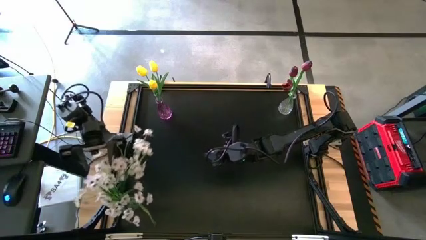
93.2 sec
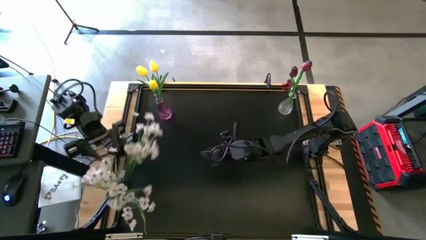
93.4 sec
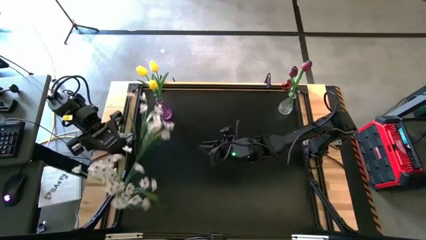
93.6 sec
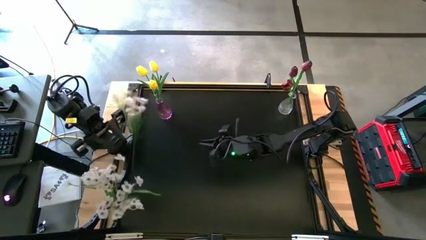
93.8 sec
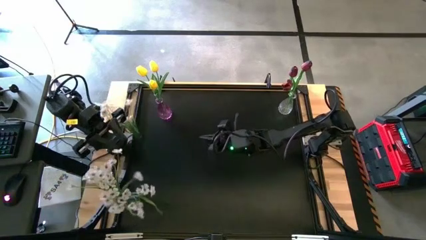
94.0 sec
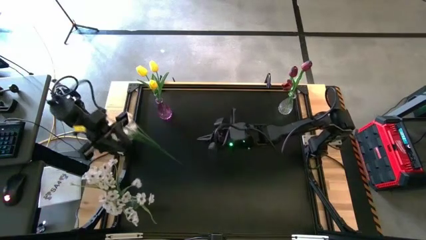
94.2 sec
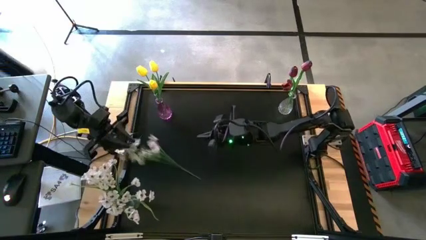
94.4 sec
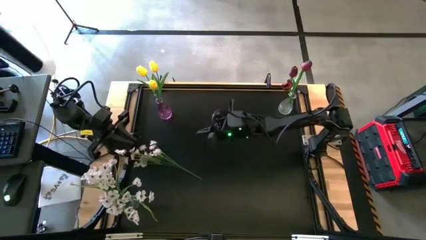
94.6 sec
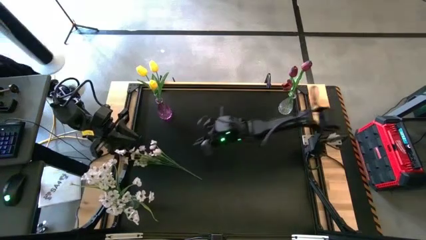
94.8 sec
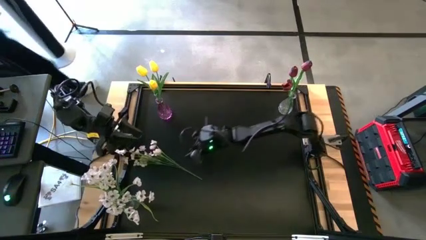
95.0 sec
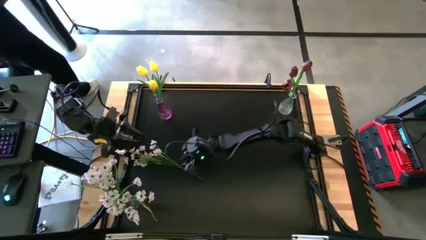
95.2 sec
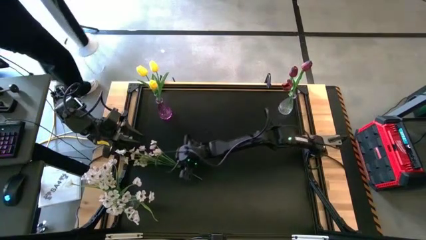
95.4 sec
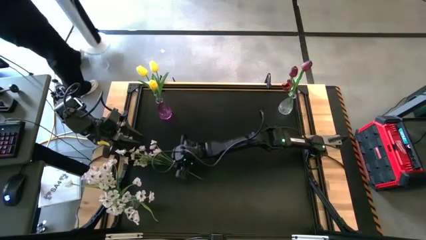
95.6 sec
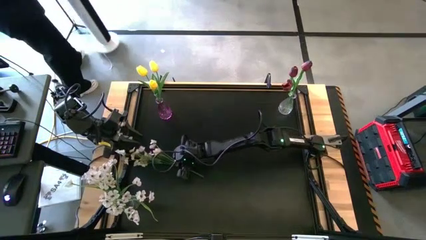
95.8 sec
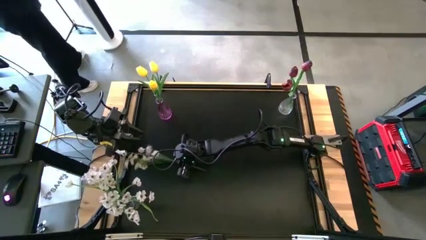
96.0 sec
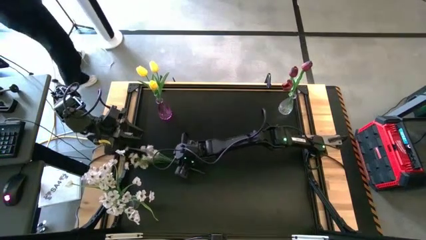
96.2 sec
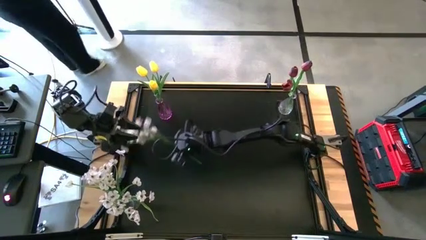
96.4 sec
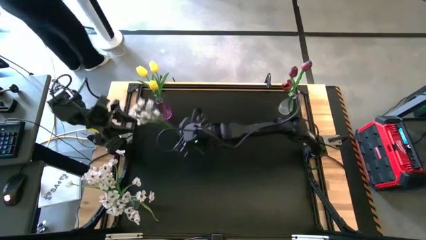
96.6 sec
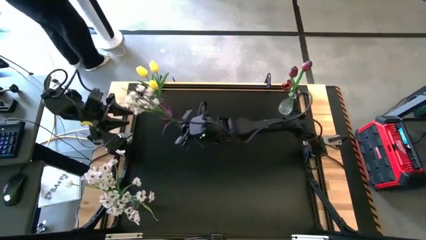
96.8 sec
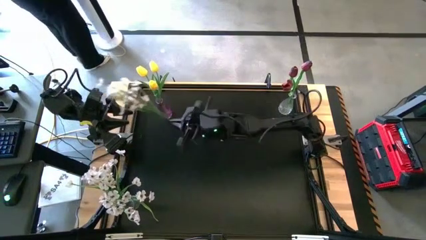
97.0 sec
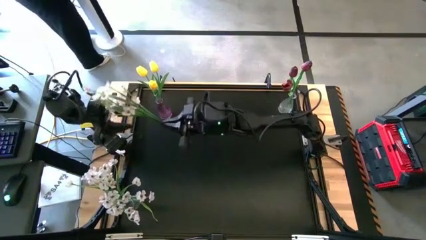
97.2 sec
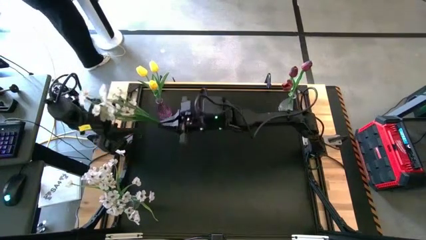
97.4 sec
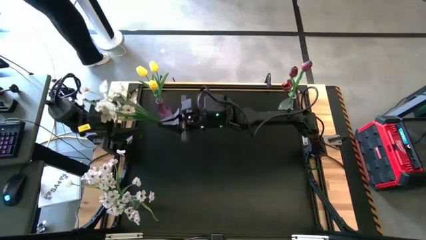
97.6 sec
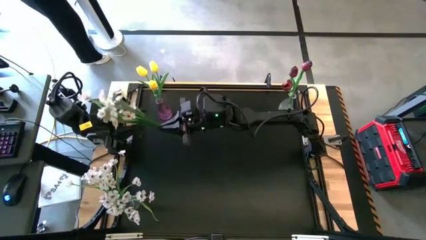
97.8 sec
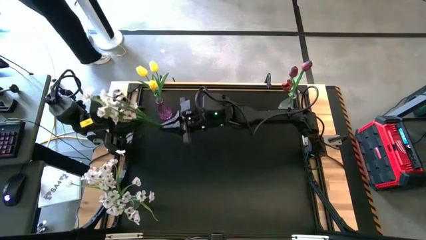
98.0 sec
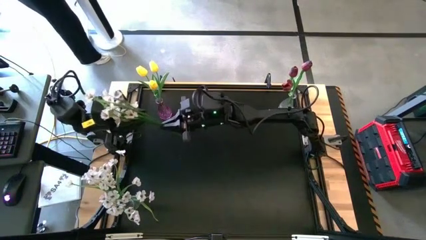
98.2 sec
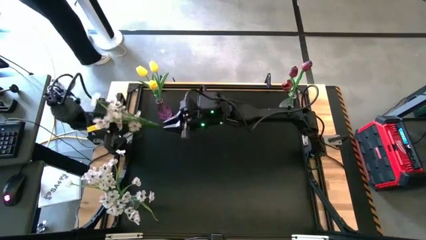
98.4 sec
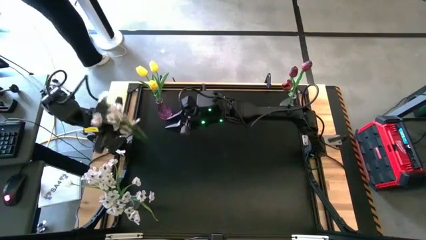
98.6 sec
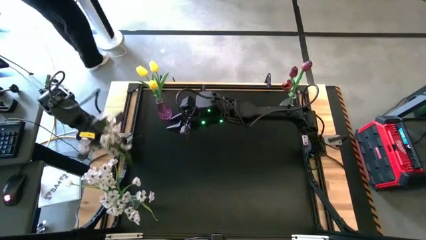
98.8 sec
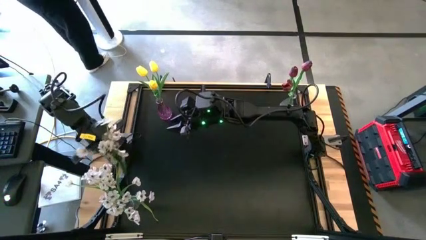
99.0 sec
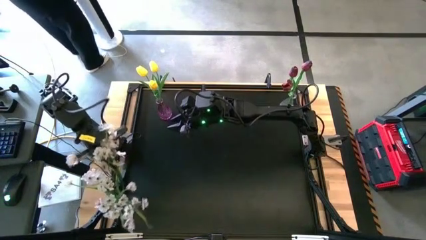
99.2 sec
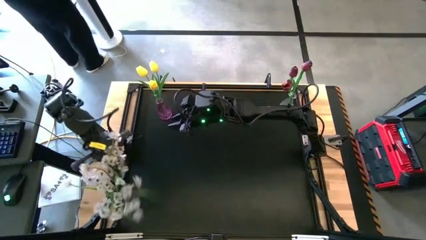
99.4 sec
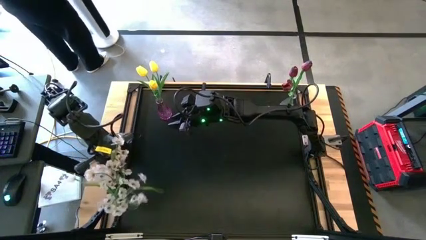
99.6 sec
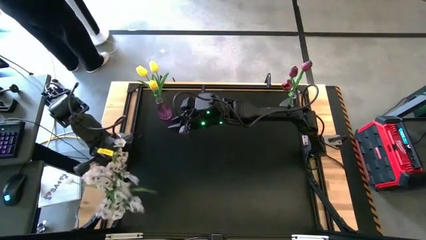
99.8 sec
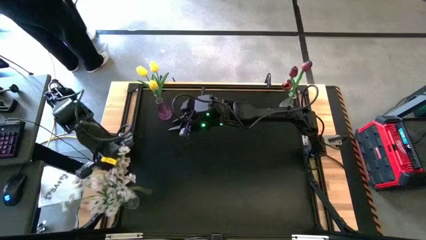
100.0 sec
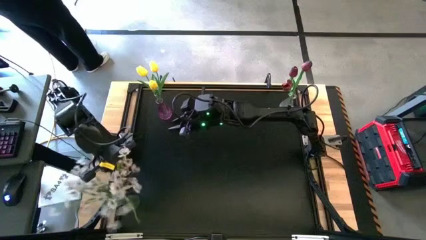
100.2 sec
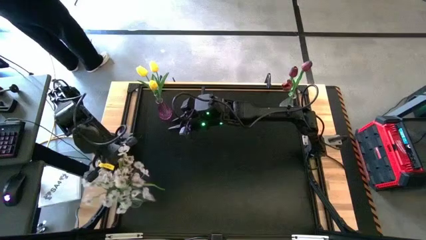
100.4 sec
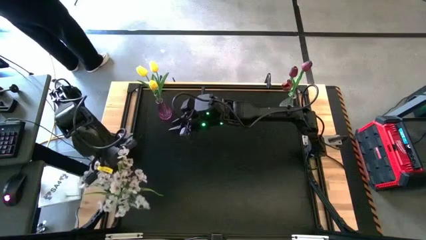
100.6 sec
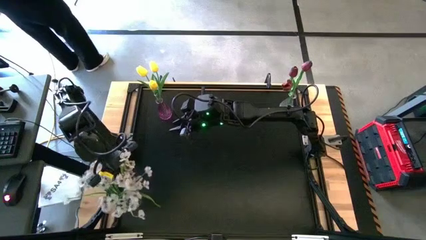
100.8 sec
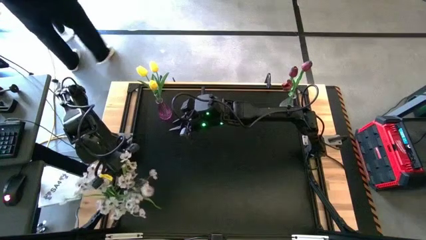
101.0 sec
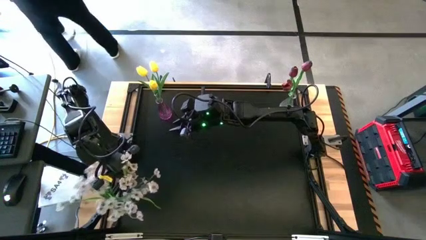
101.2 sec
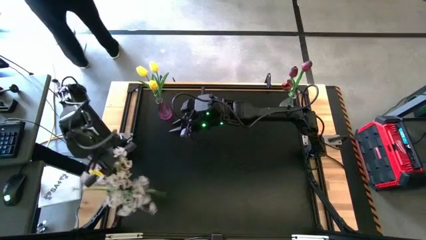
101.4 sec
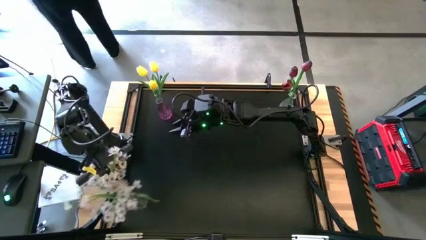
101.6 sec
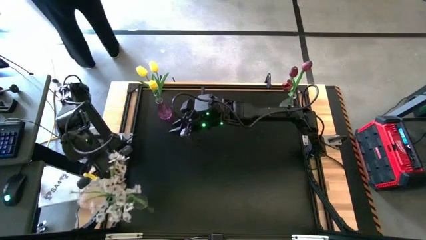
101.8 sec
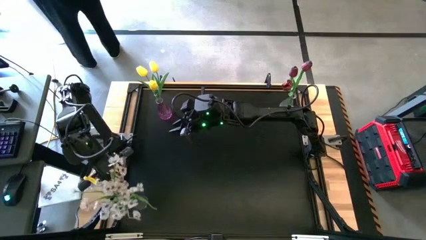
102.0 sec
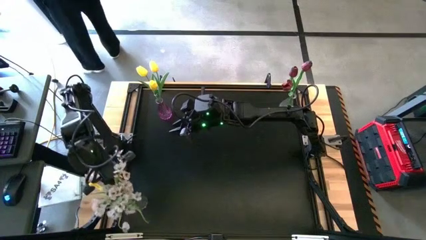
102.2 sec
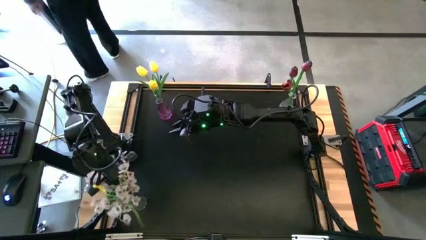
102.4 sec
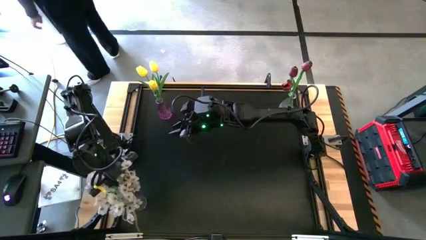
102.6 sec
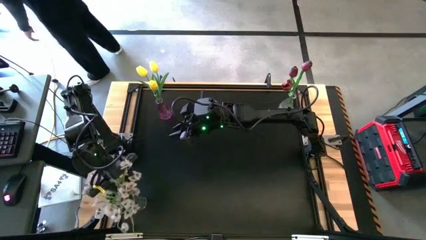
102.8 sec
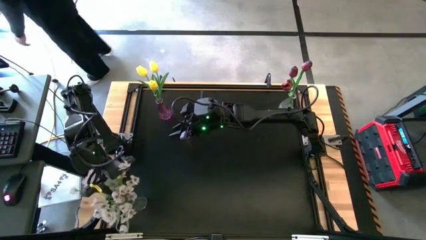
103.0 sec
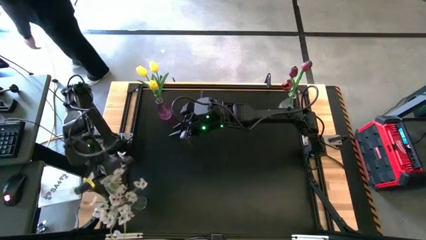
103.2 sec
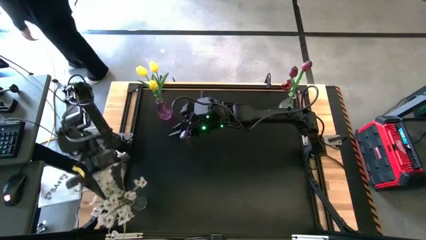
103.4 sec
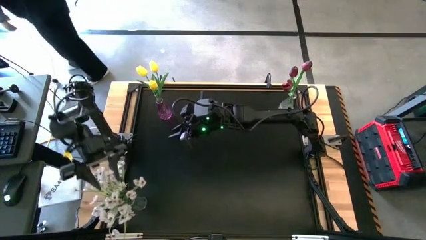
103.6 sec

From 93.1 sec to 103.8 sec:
Task: Sort flowers into vase by color
Put the white flowers into the bottom transparent vase

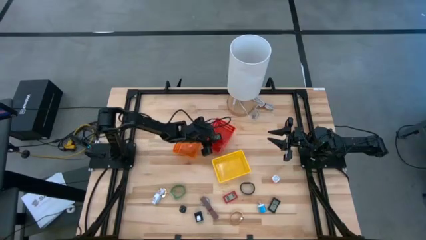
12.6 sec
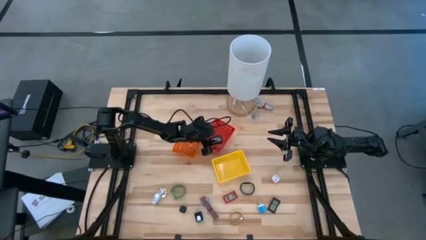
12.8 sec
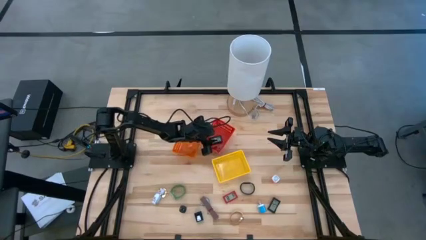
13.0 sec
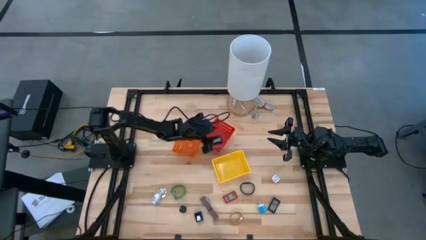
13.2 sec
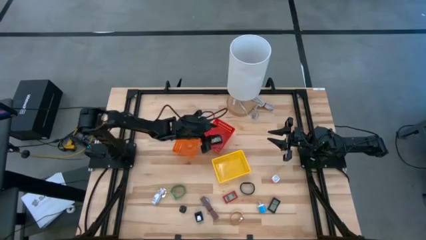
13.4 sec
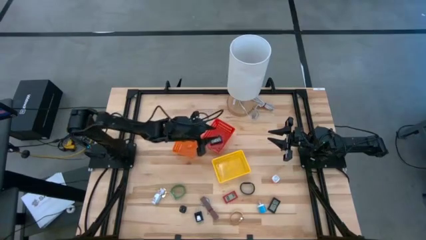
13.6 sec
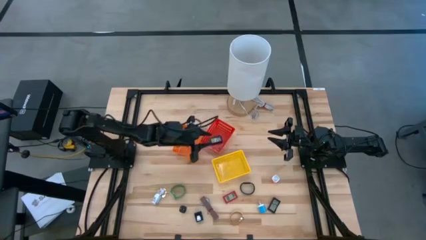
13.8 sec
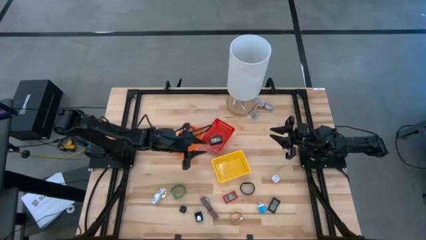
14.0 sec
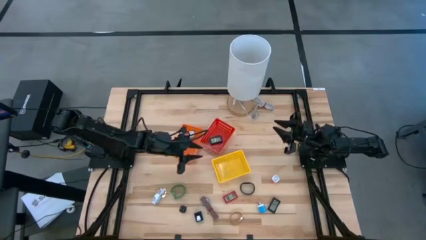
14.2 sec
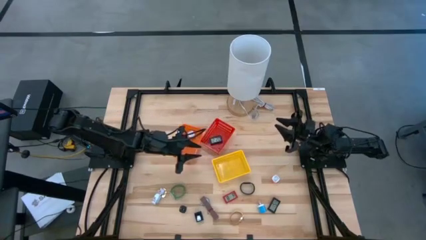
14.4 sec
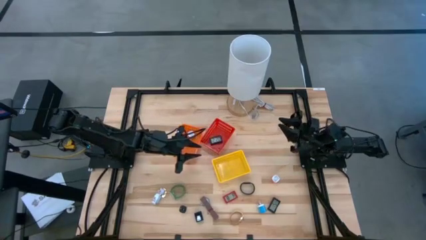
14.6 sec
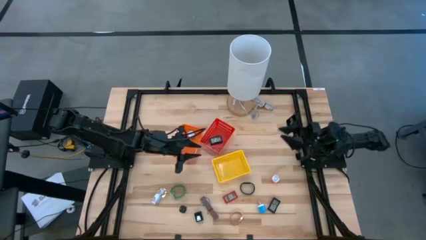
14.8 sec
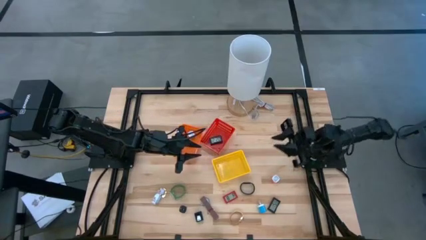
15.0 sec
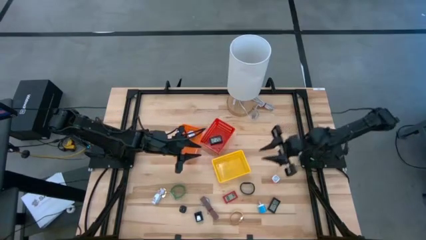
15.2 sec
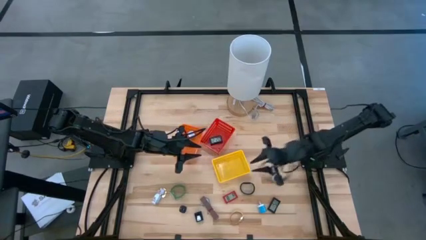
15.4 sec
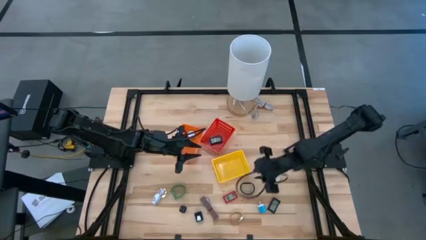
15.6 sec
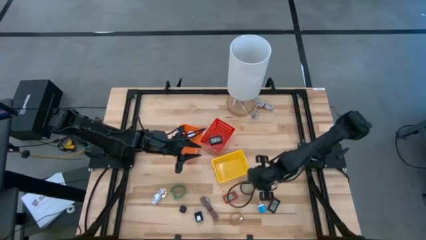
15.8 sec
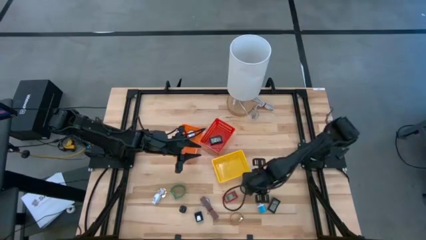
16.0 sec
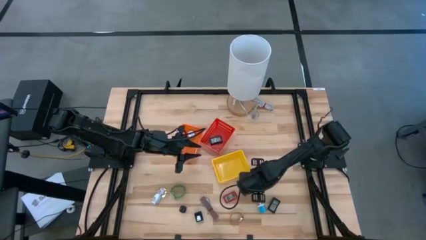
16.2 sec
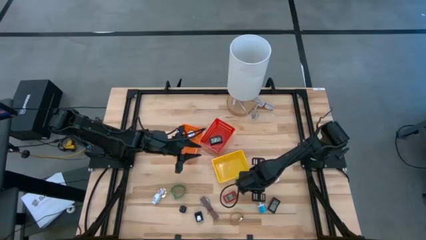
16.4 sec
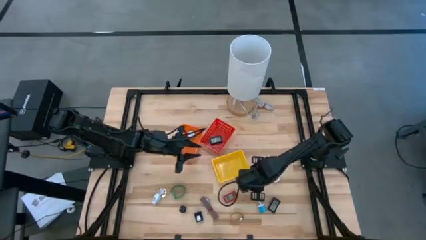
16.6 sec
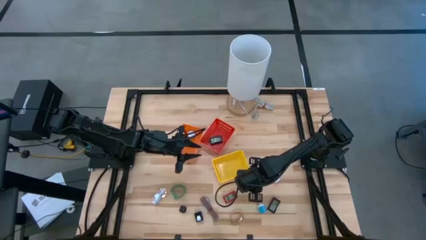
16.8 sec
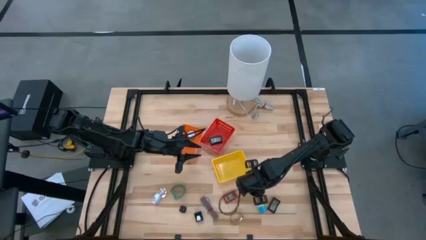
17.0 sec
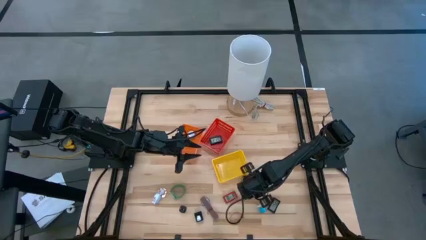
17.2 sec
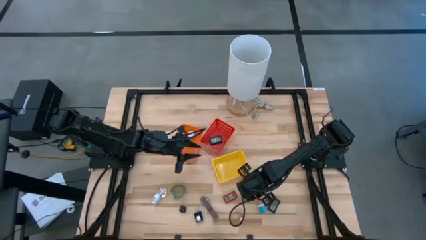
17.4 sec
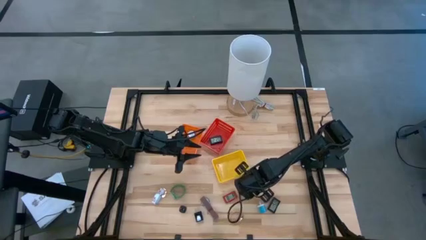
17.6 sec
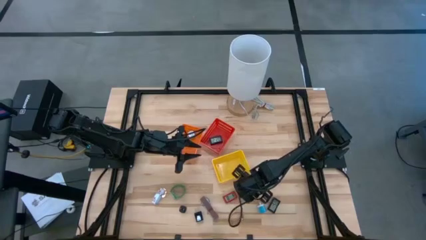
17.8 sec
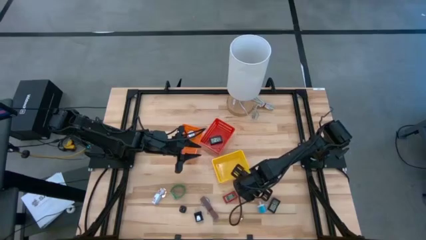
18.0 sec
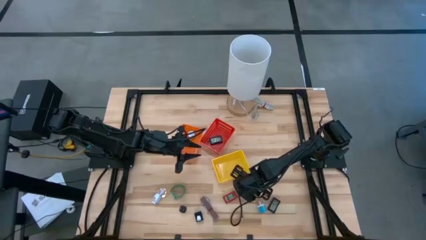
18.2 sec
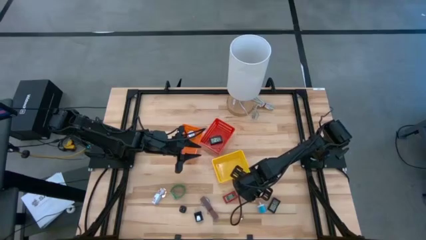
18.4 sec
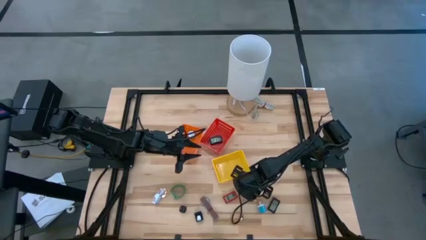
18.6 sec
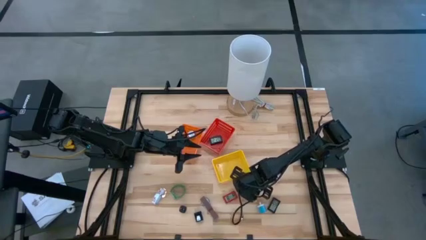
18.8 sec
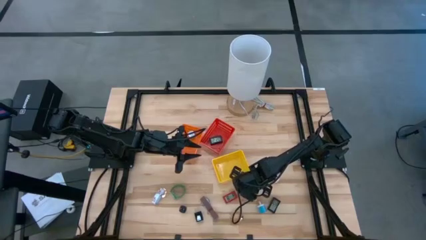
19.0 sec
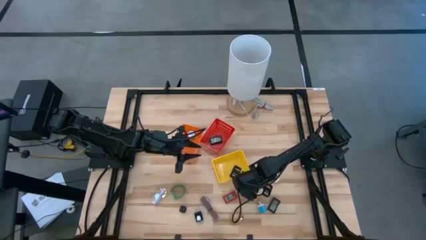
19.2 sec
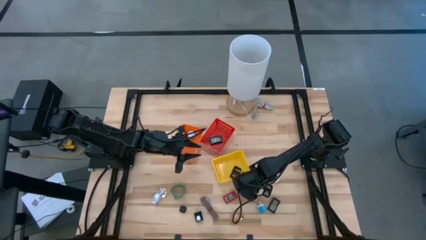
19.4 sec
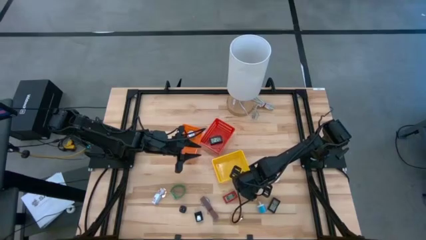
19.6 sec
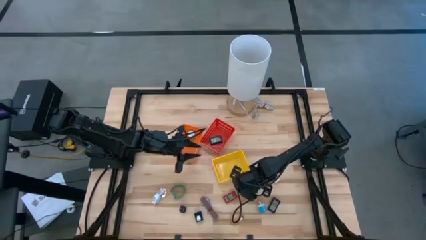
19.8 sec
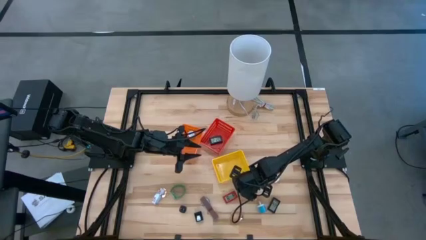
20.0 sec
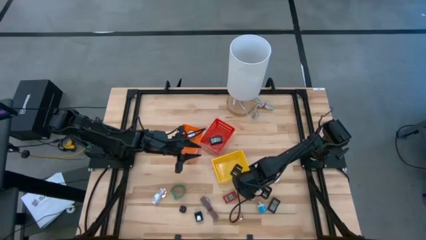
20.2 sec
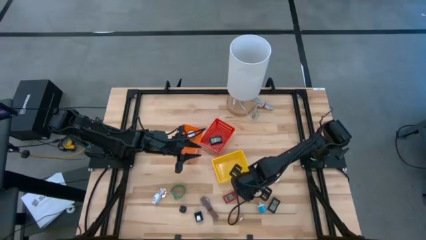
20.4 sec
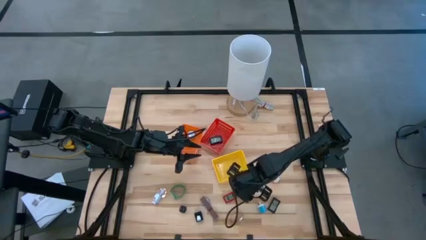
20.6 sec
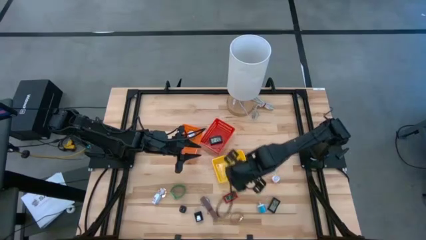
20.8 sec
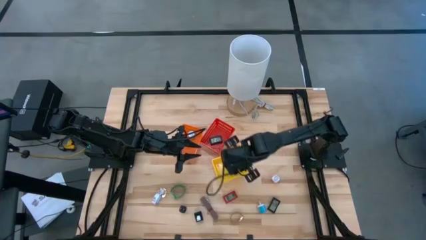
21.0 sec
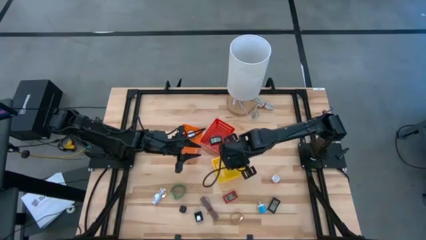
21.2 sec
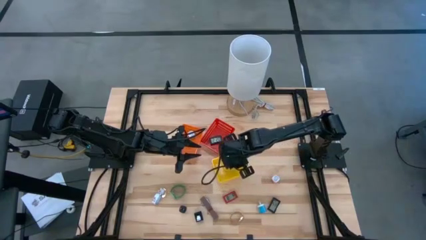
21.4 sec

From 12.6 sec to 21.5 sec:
Task: Pick & Place Office items
Put the black wrist watch into the yellow bin
